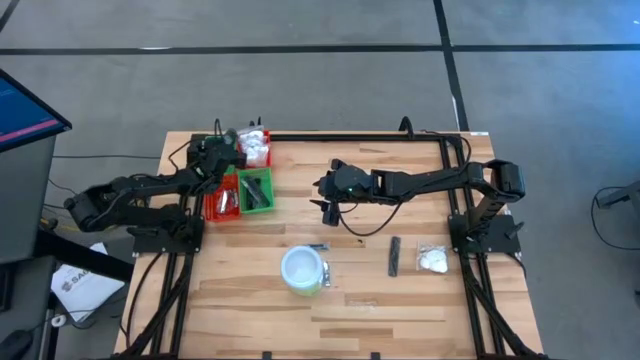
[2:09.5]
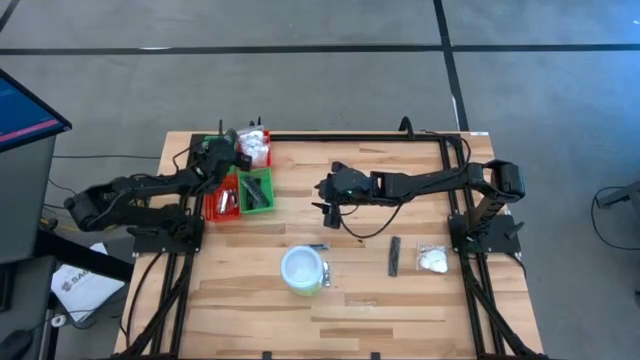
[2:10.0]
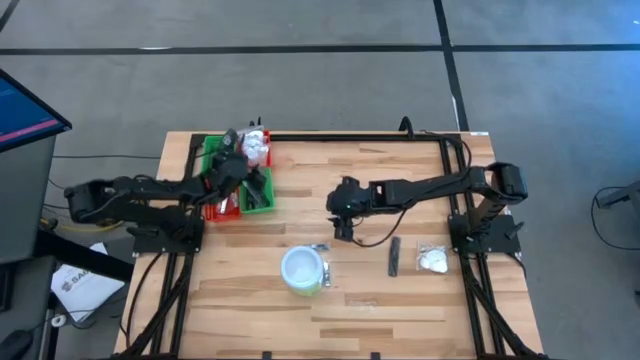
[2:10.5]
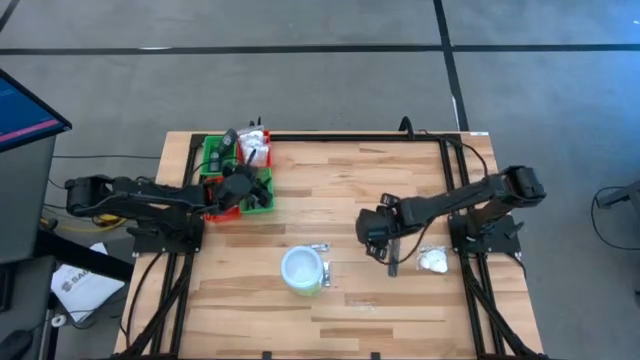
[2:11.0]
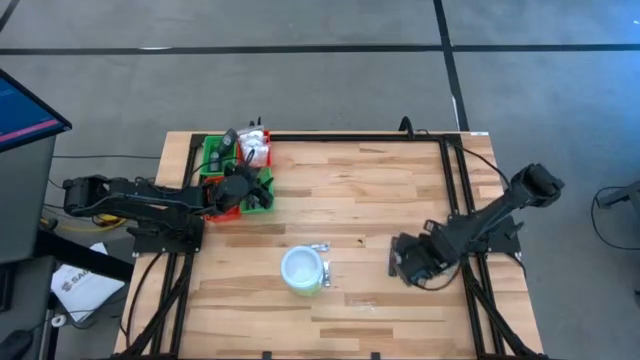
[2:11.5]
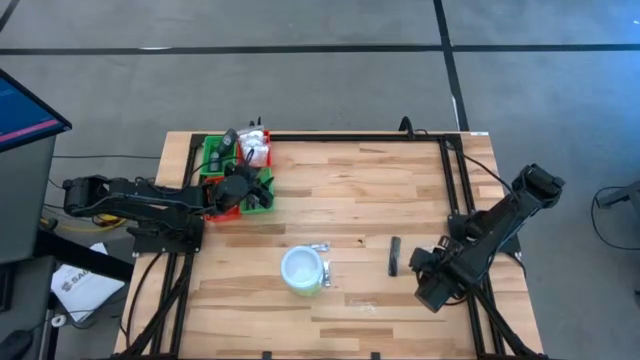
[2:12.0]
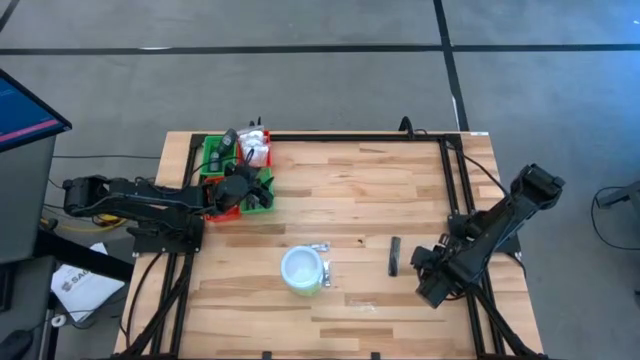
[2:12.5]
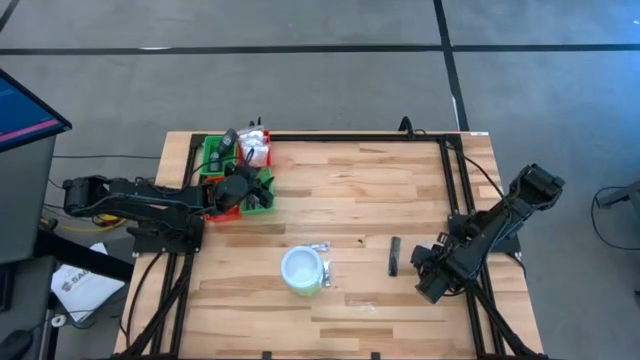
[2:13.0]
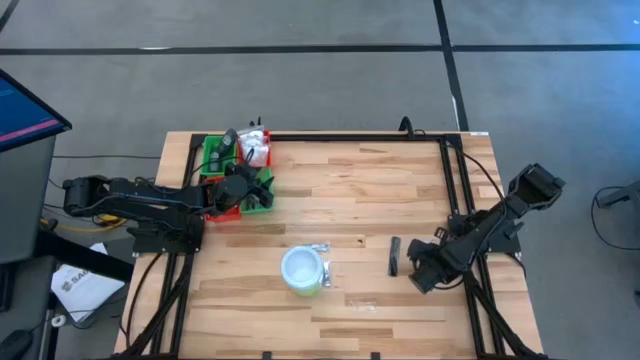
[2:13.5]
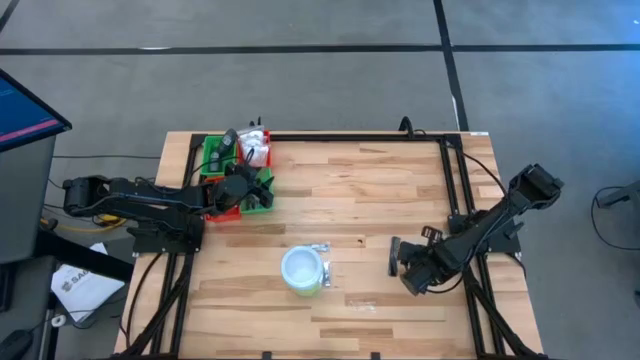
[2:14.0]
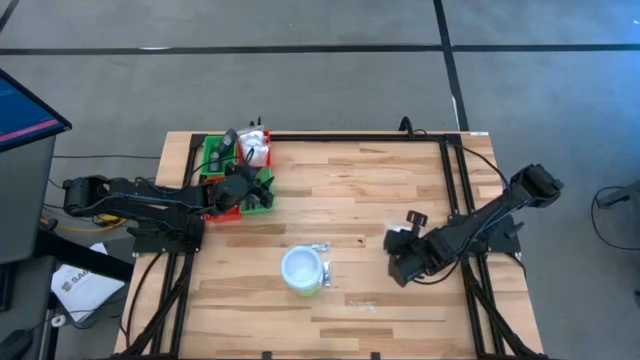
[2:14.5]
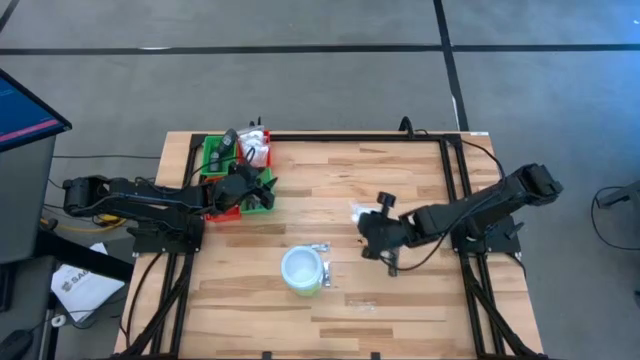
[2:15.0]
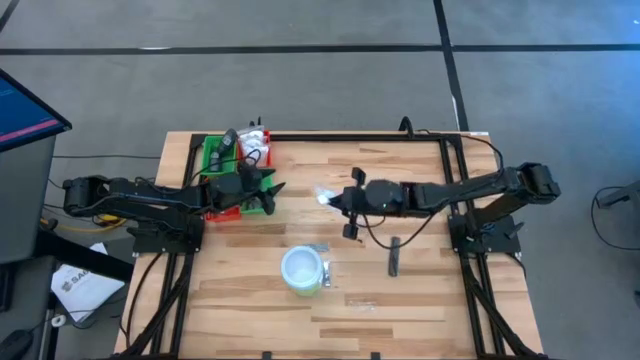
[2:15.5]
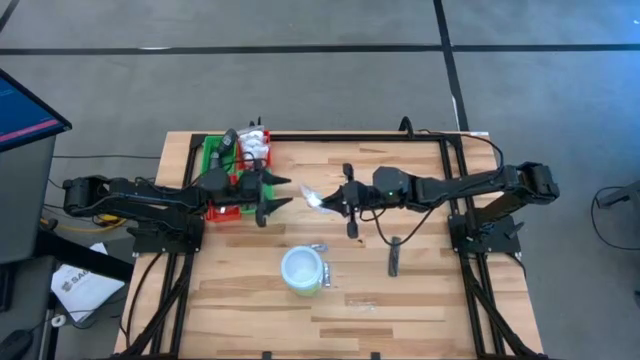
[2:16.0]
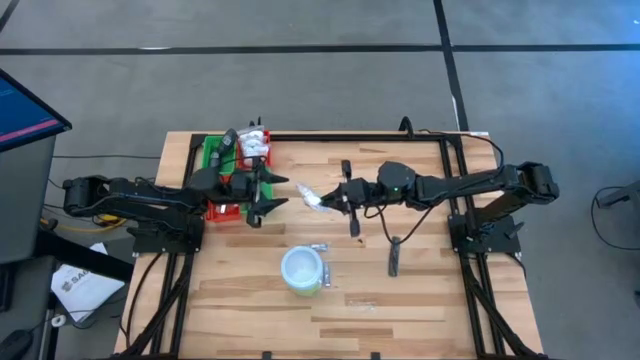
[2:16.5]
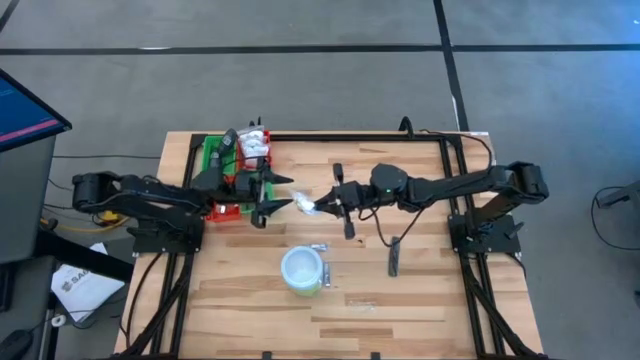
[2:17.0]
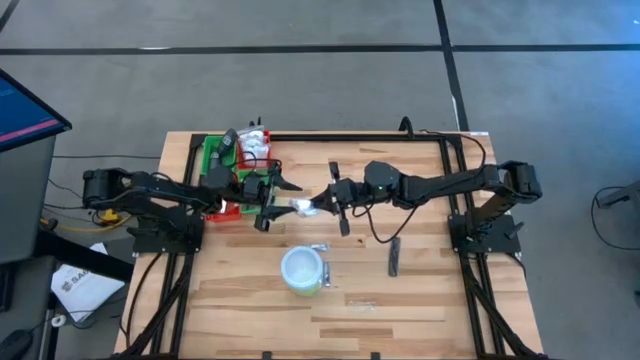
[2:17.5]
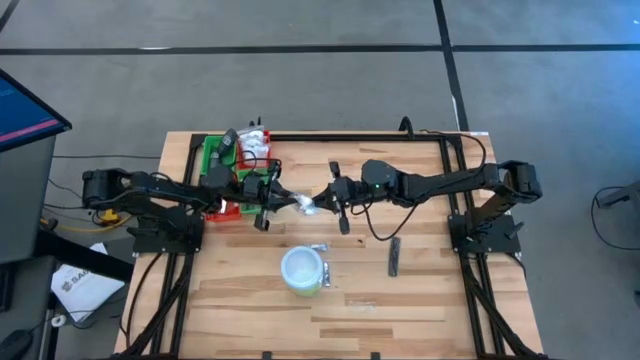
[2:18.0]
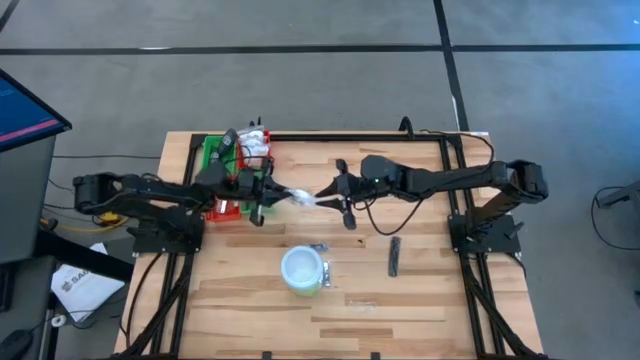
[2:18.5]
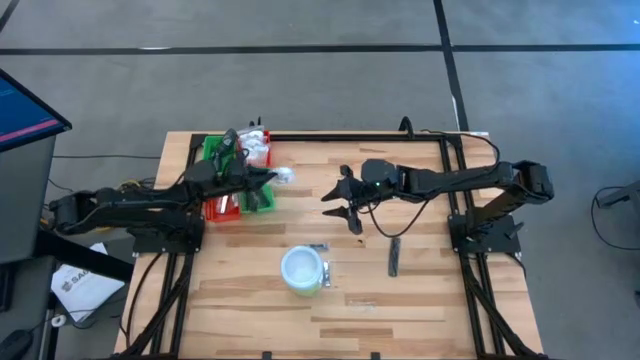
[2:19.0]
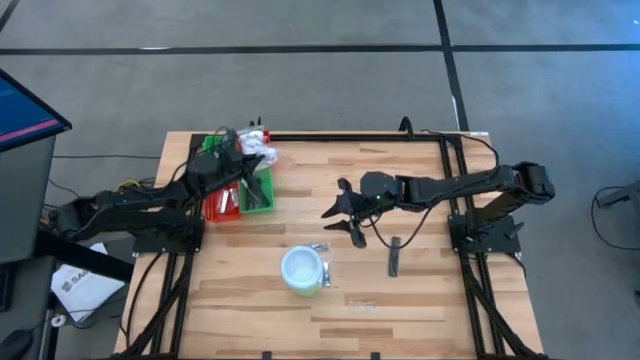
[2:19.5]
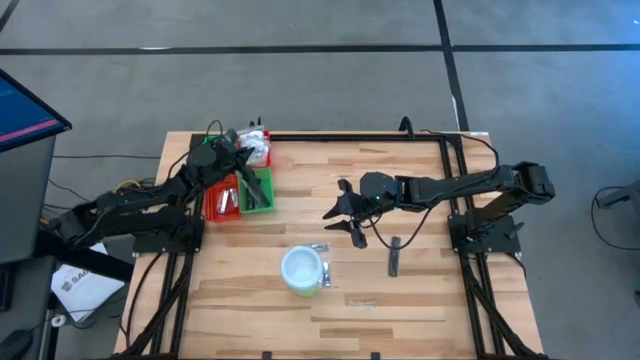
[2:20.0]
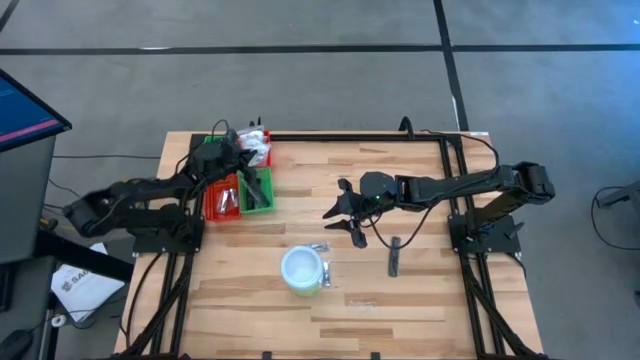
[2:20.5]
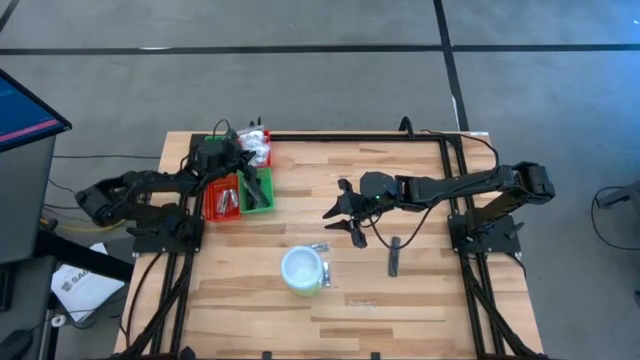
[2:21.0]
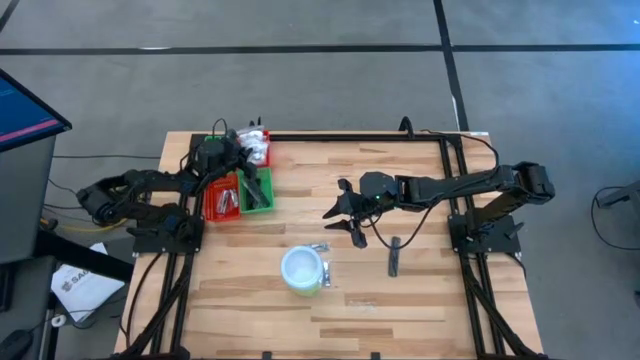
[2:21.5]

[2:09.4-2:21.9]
Task: Pick & Place Travel size toiletries
Put the white cotton pack into the top red bin

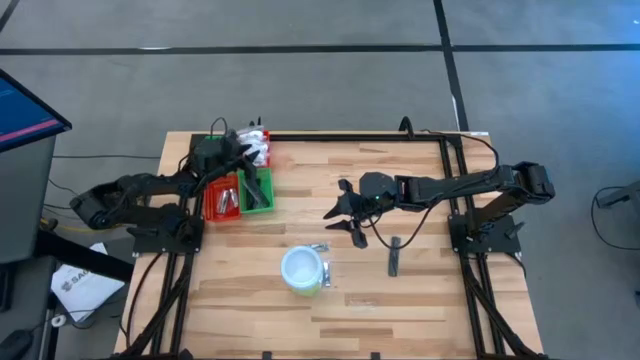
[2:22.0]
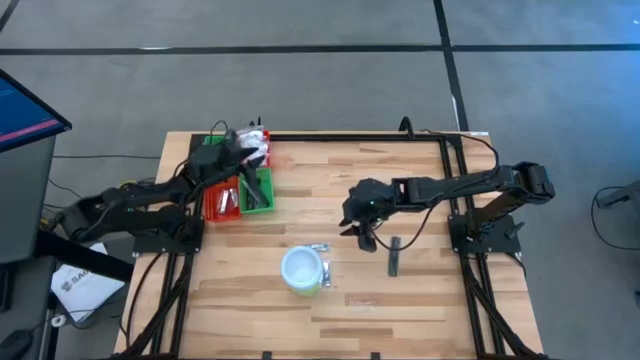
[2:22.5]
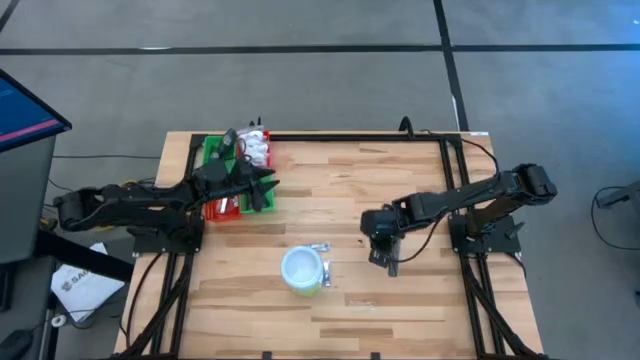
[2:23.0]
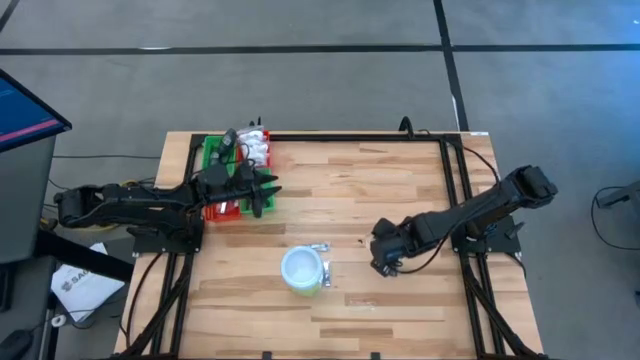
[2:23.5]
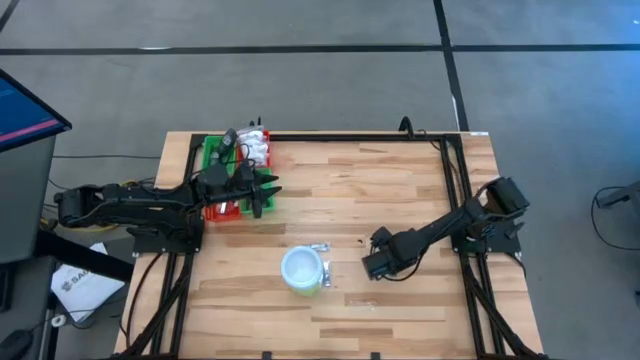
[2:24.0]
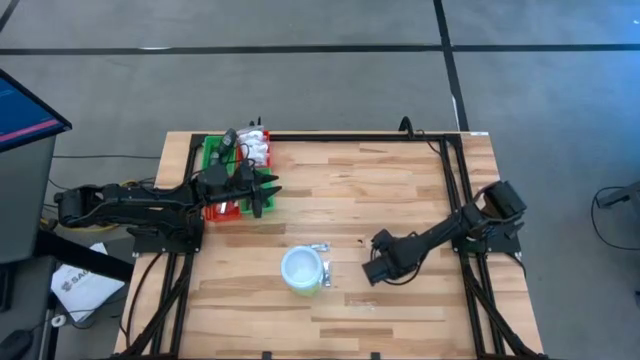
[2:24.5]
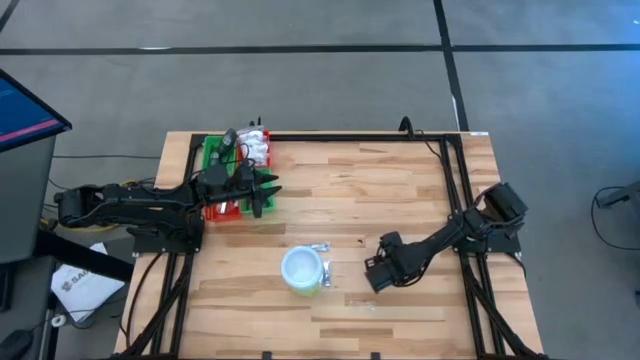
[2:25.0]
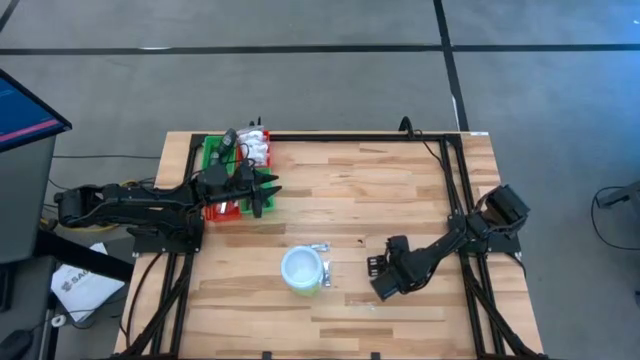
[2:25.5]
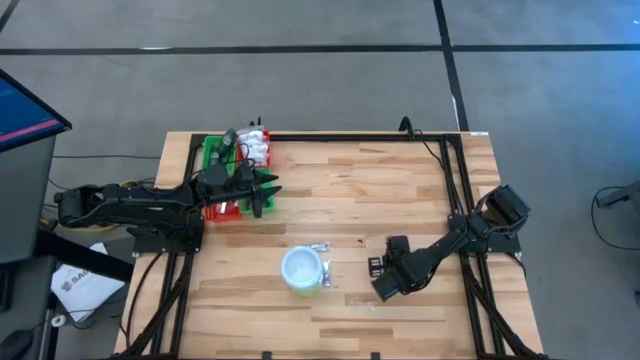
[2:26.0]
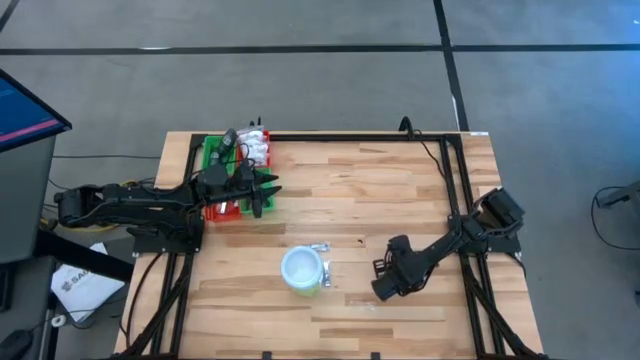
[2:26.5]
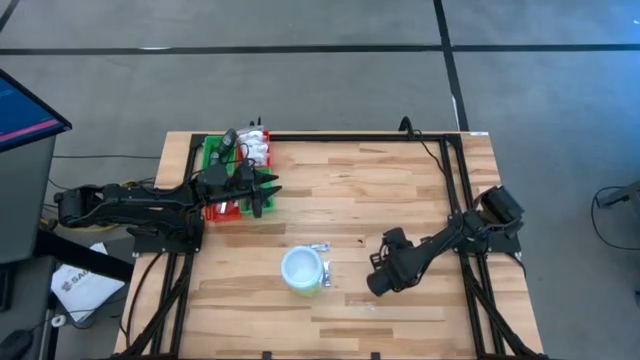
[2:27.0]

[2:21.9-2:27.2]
Put the black comb into the bottom green bin

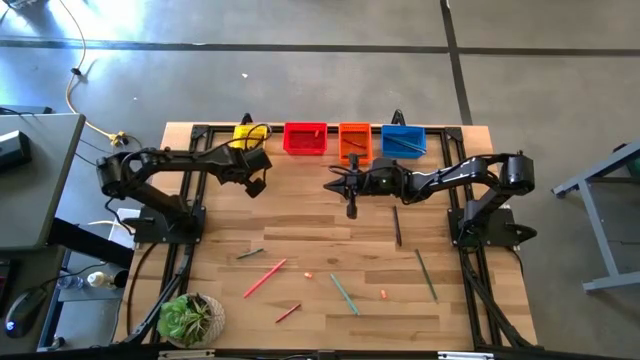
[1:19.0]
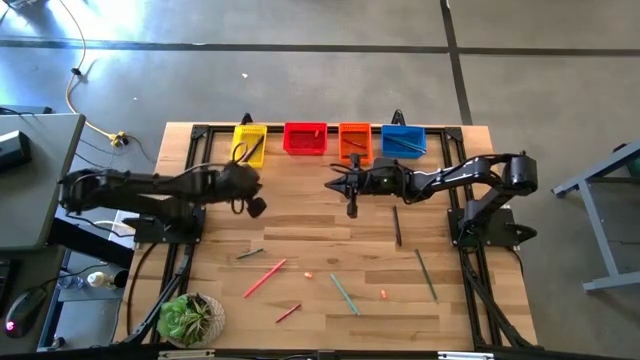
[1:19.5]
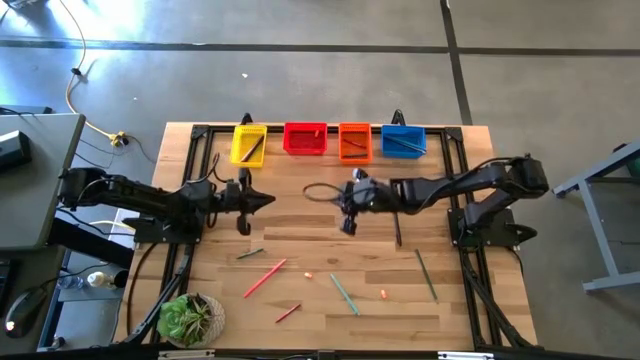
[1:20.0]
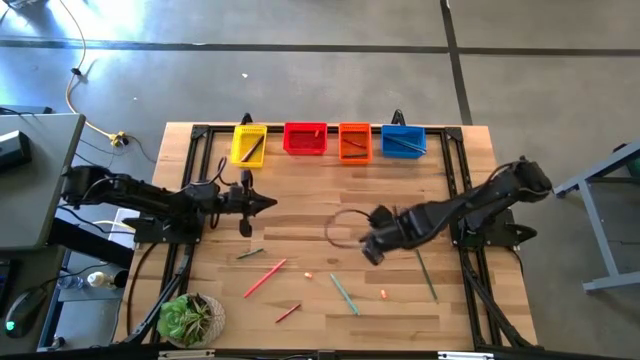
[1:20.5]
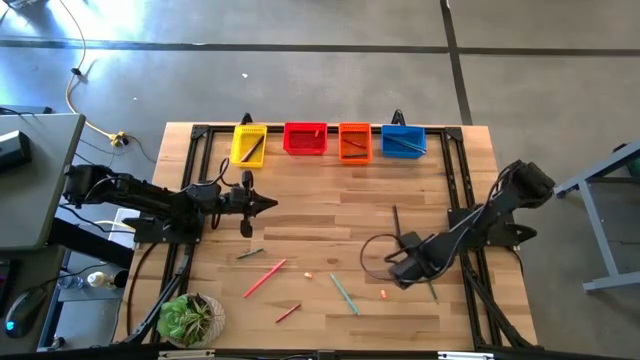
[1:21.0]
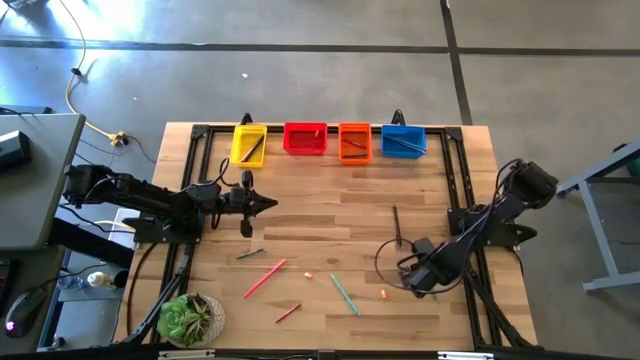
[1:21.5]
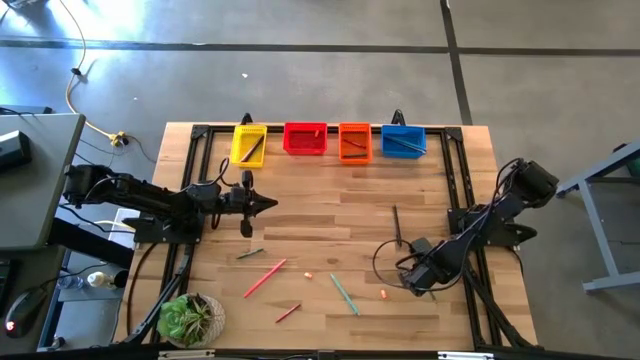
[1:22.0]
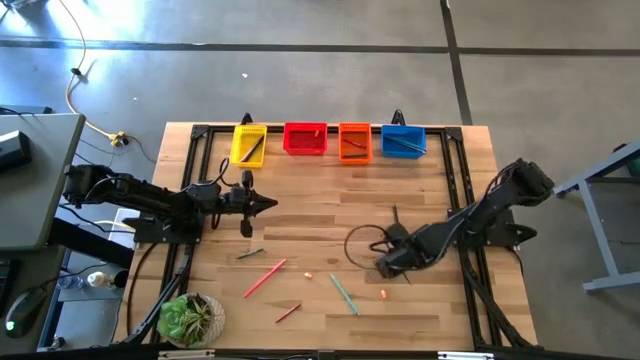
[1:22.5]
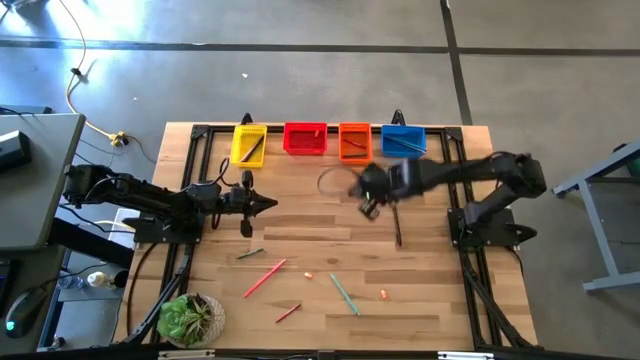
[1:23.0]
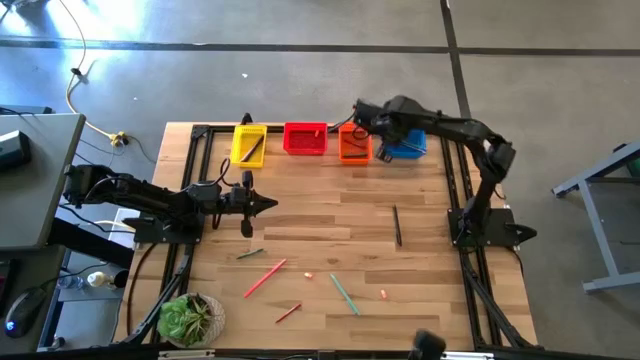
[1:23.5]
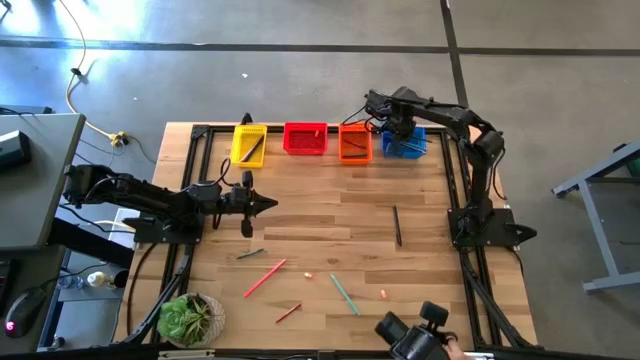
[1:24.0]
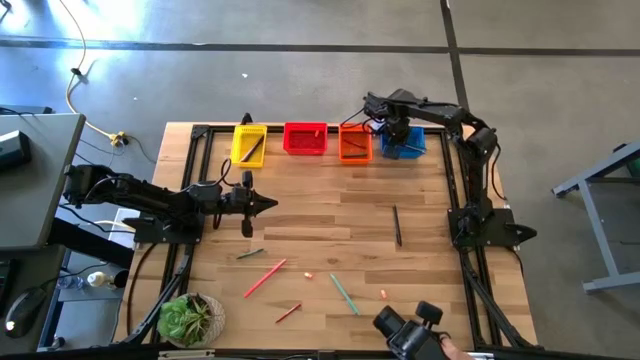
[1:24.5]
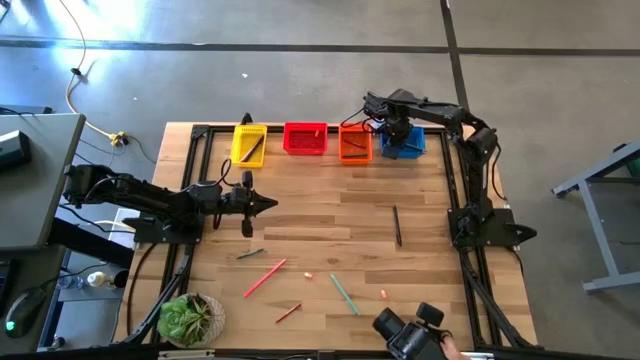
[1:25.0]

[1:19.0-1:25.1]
Task: Sort crayons/erasers/pens/pencils in bins
Put the green pencil into the blue basket
